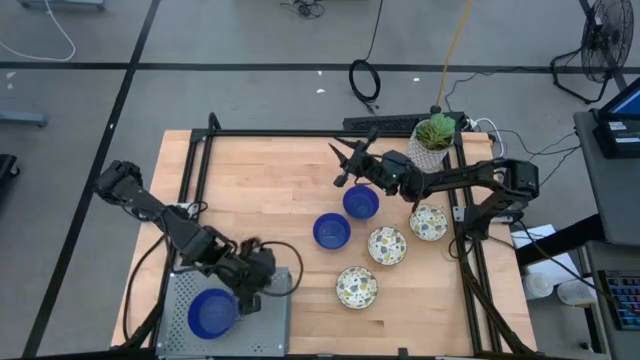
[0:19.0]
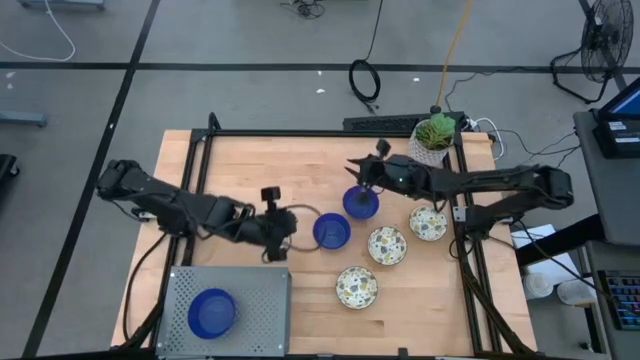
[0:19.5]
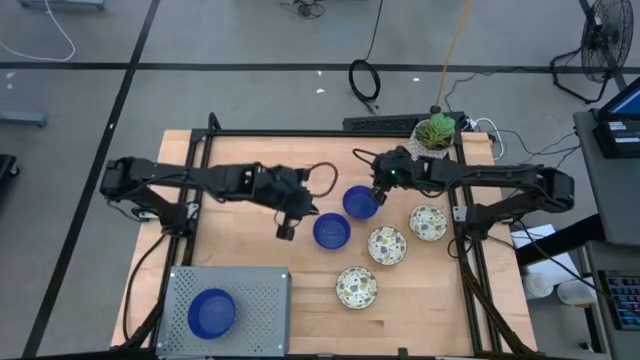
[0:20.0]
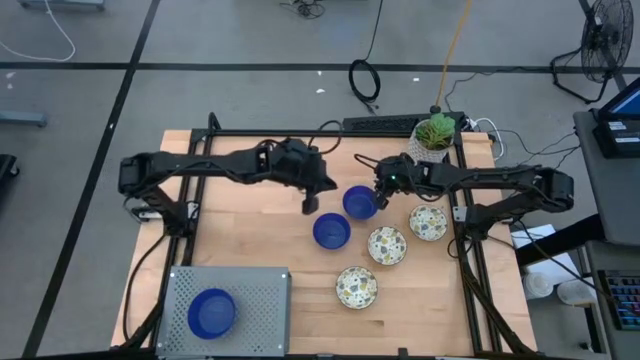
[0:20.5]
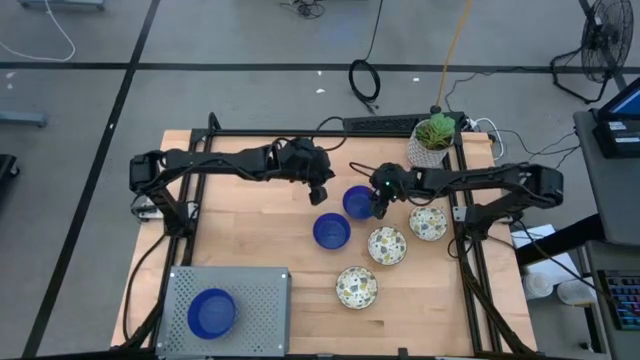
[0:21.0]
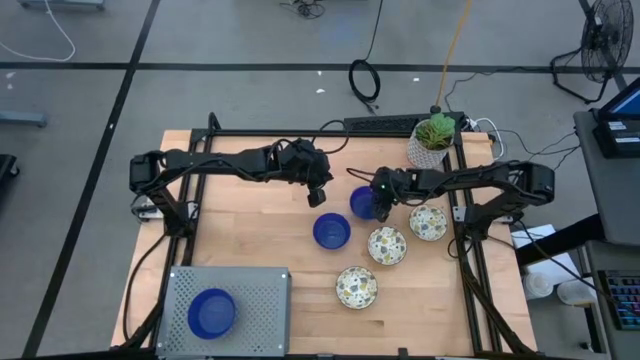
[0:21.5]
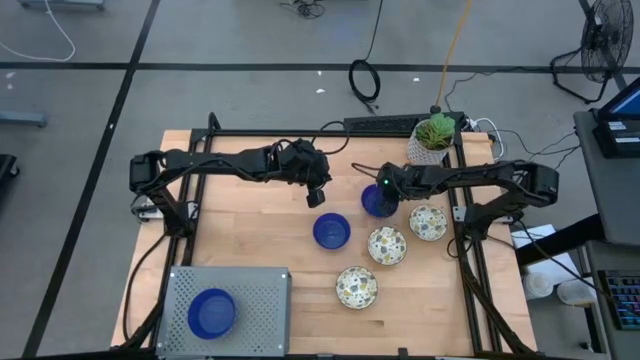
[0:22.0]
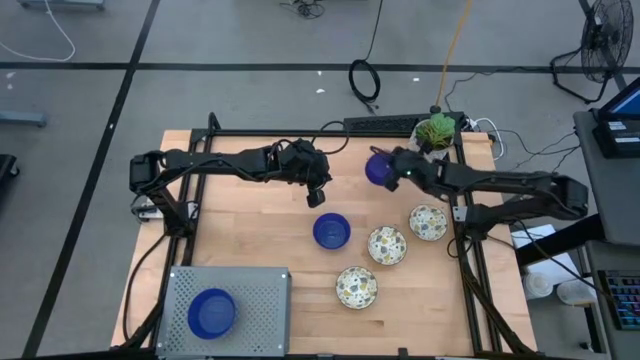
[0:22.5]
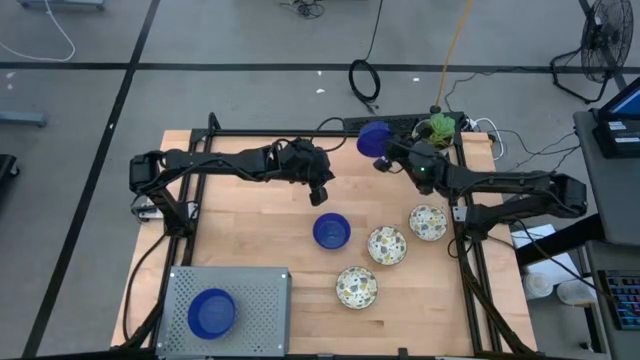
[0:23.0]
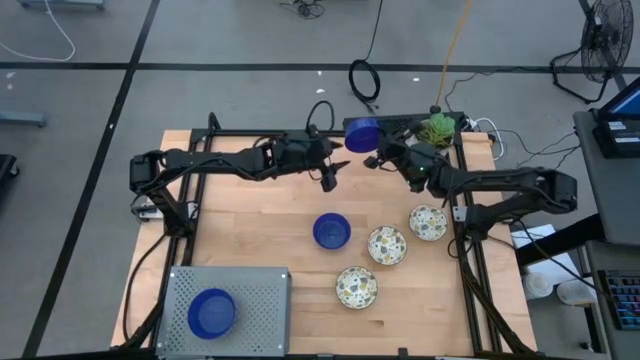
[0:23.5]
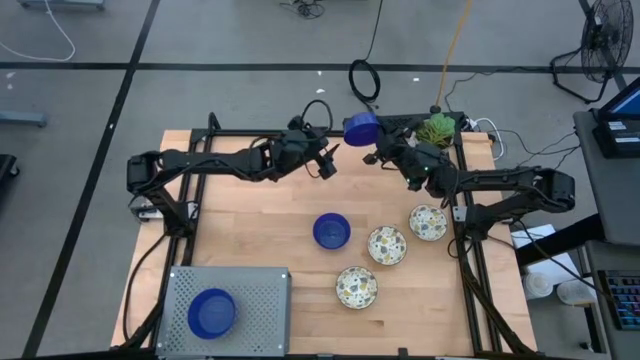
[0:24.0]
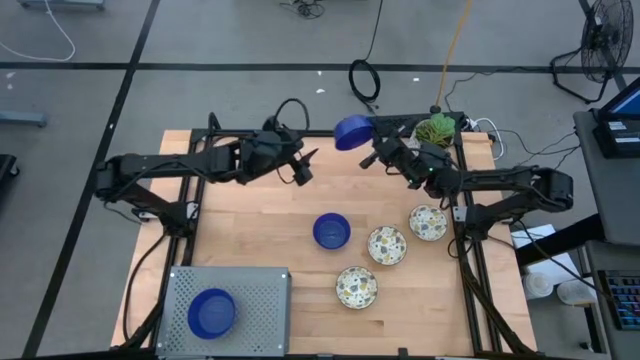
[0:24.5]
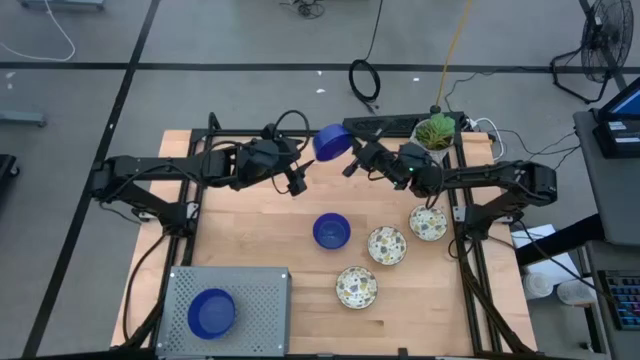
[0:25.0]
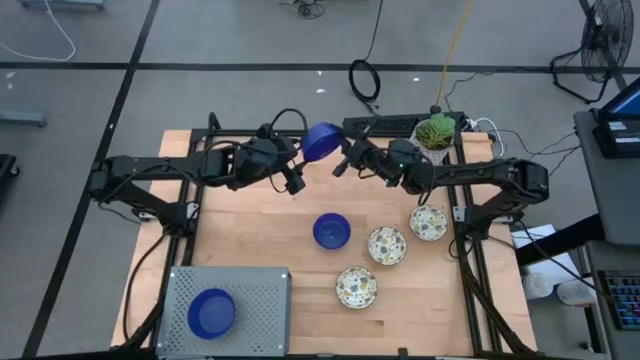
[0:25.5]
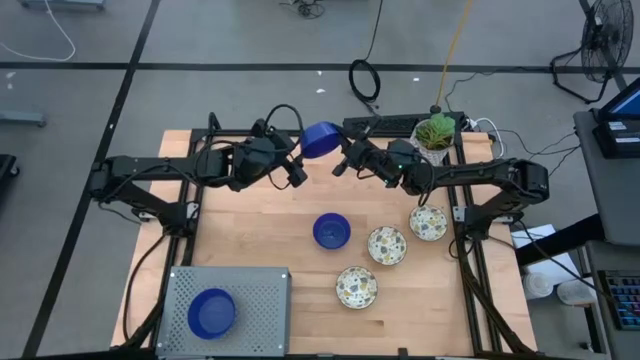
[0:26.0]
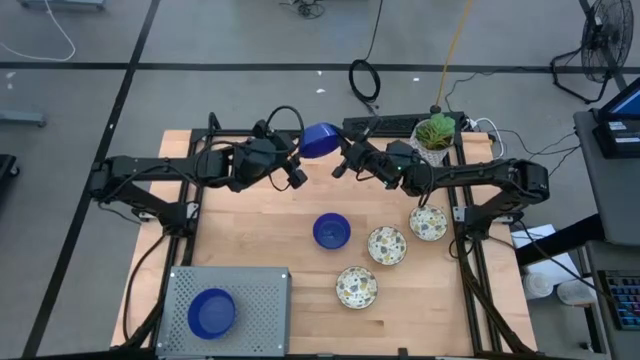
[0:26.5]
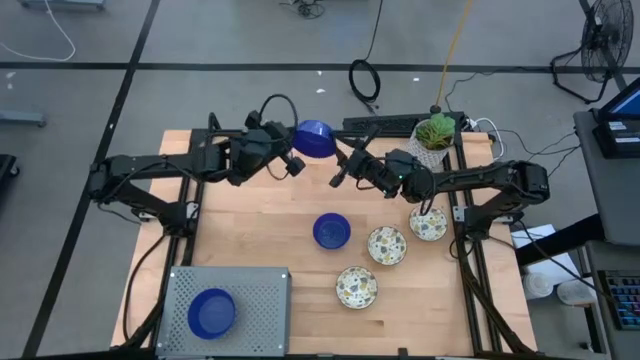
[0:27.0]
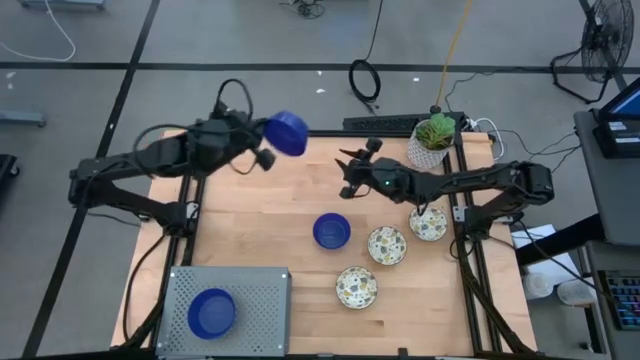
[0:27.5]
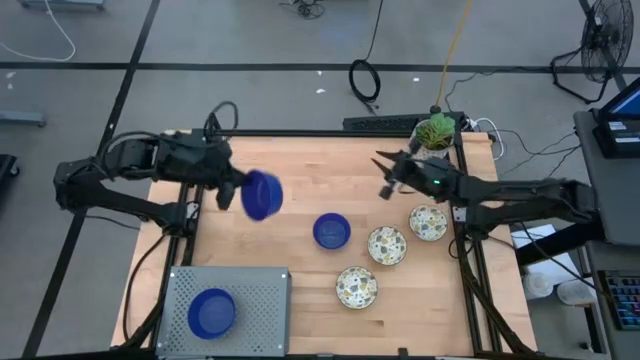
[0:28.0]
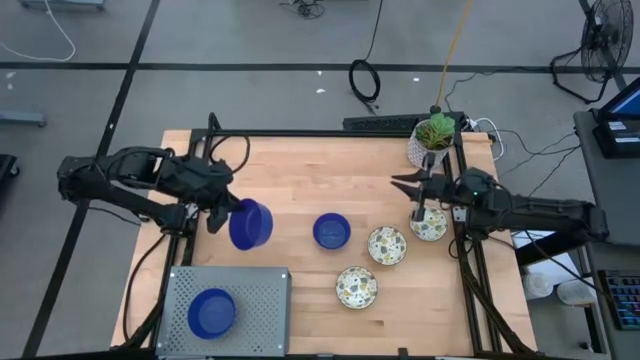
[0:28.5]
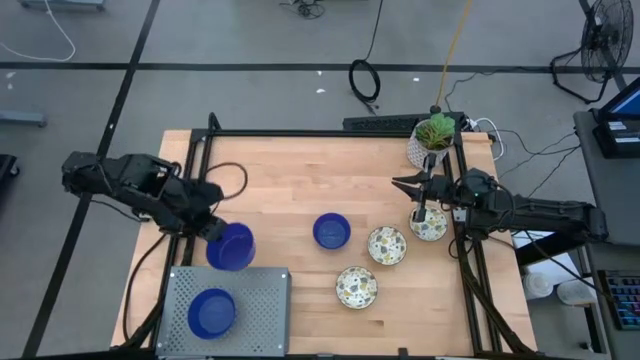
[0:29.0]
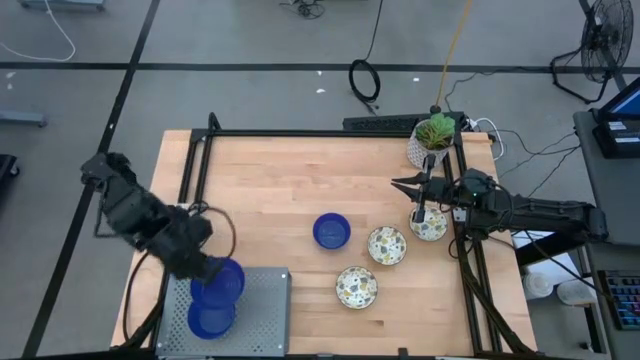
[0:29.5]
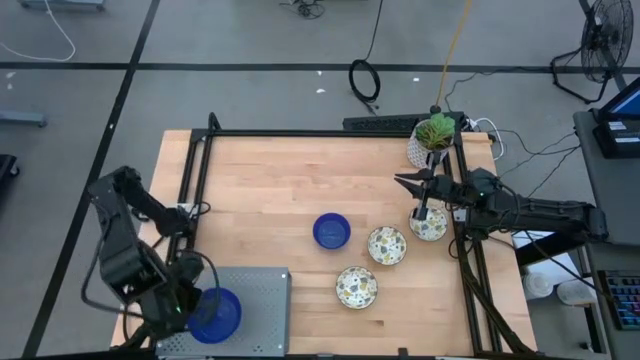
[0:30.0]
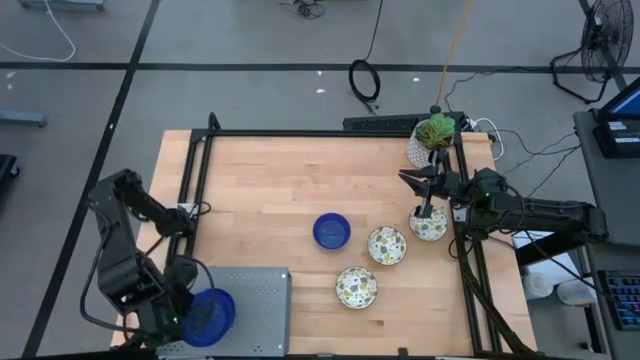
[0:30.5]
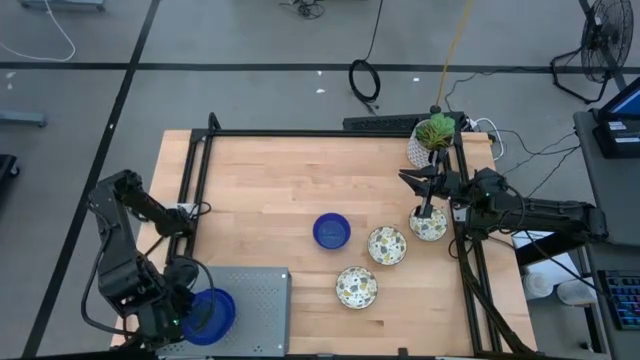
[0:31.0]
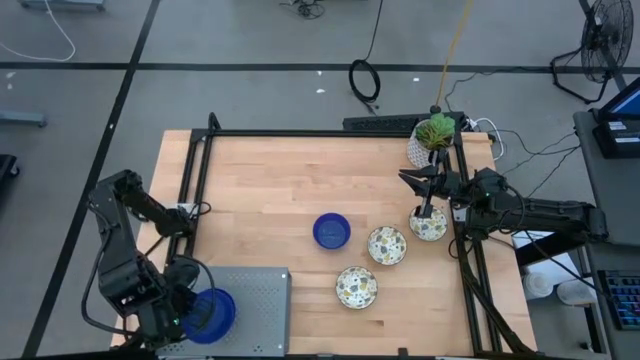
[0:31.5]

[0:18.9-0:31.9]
Task: Pick & Place Mini bowls
Stack the right blue bowl on top of the other blue bowl on the shelf

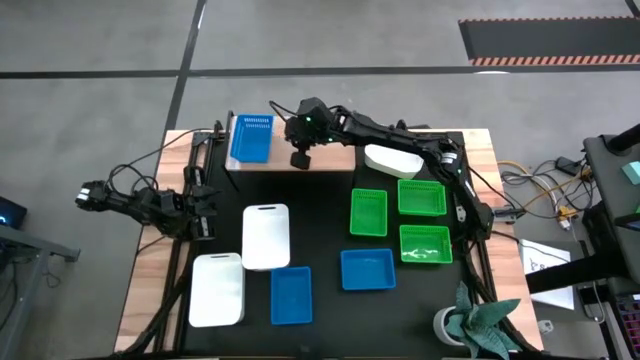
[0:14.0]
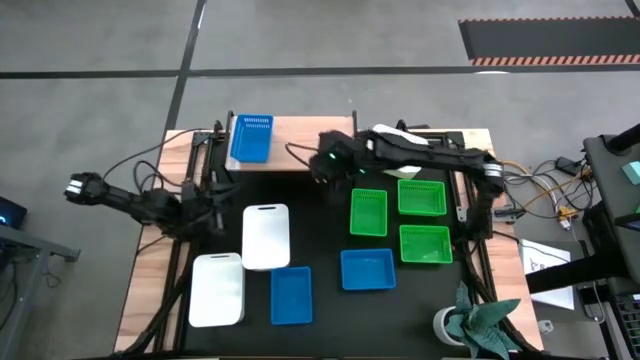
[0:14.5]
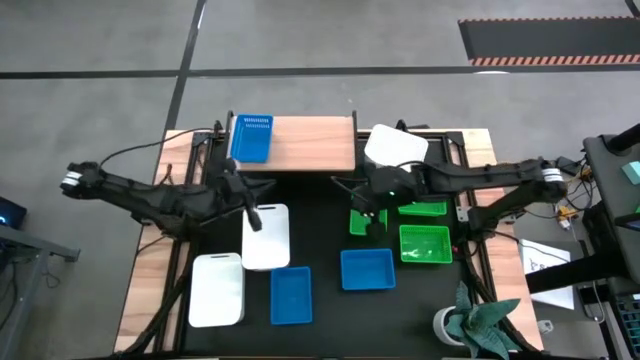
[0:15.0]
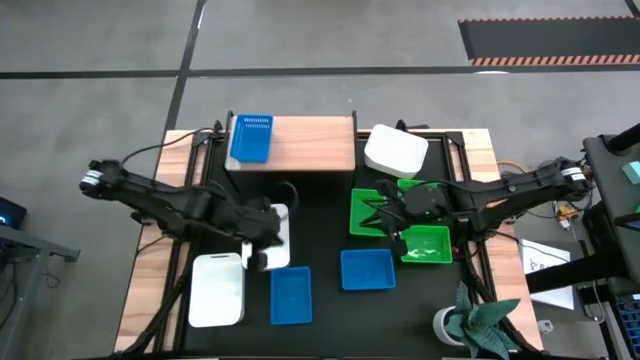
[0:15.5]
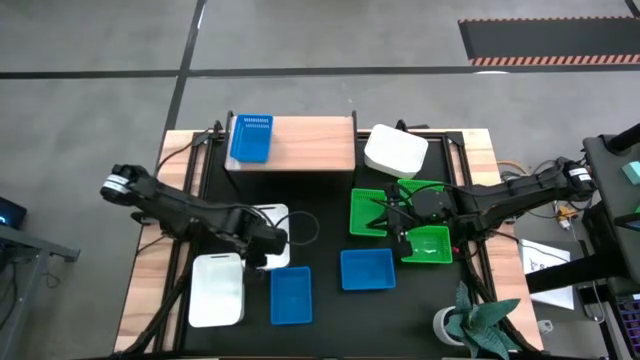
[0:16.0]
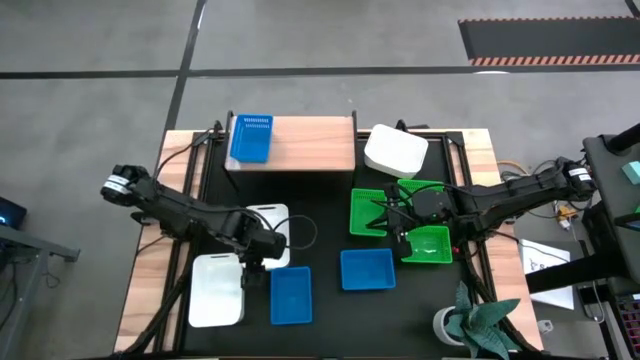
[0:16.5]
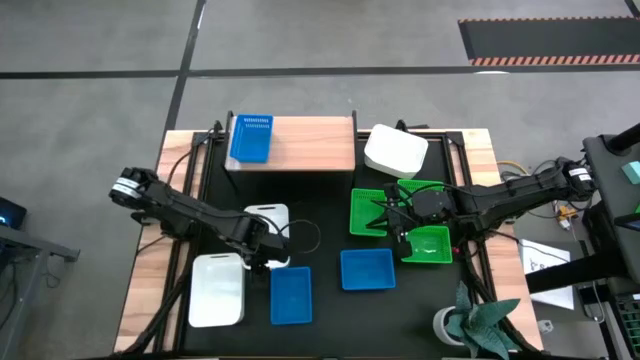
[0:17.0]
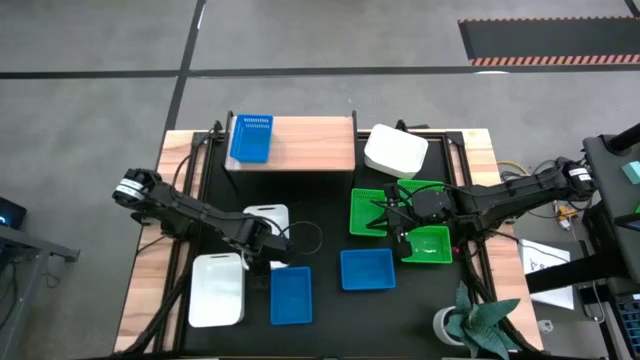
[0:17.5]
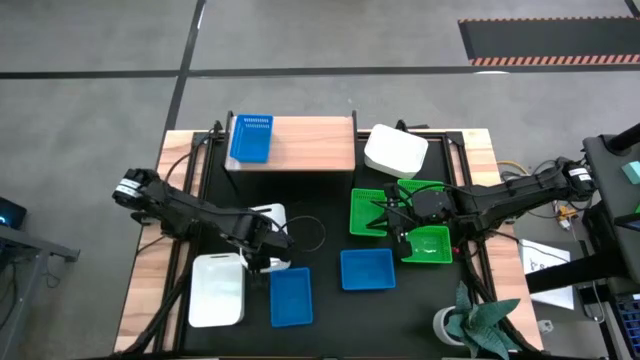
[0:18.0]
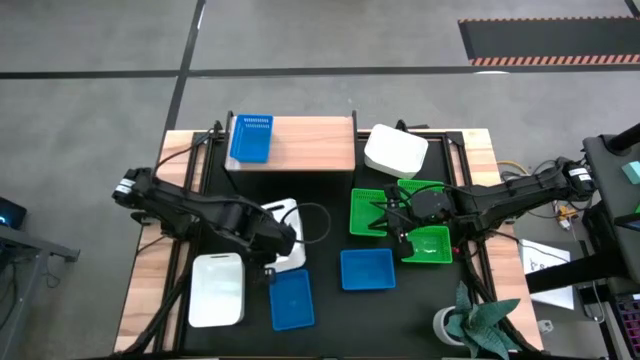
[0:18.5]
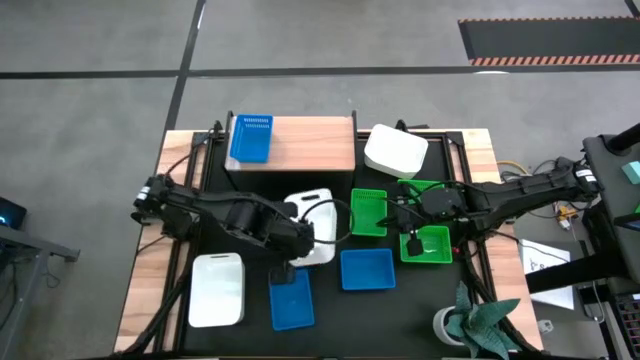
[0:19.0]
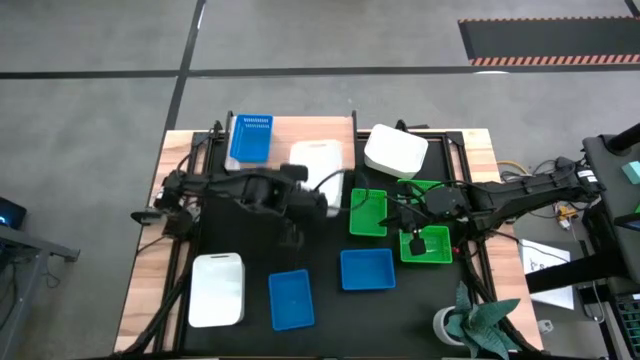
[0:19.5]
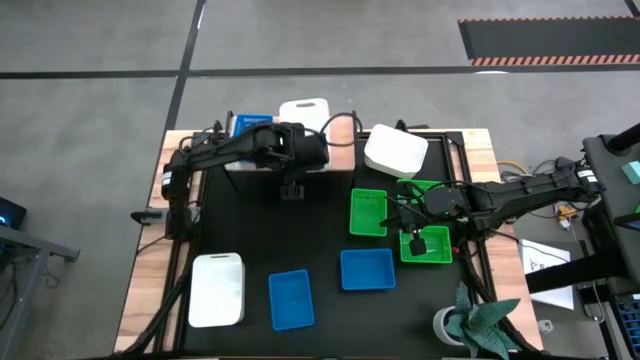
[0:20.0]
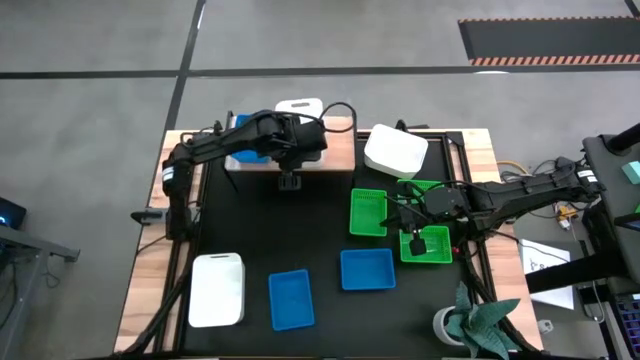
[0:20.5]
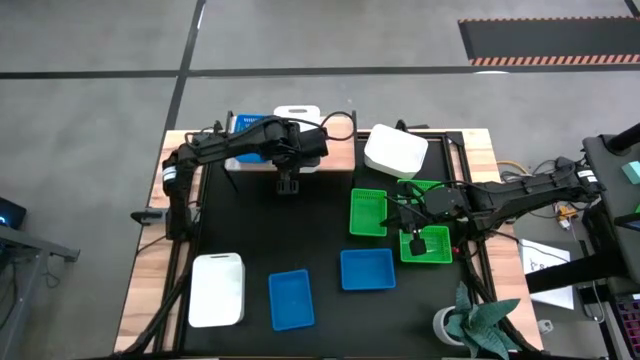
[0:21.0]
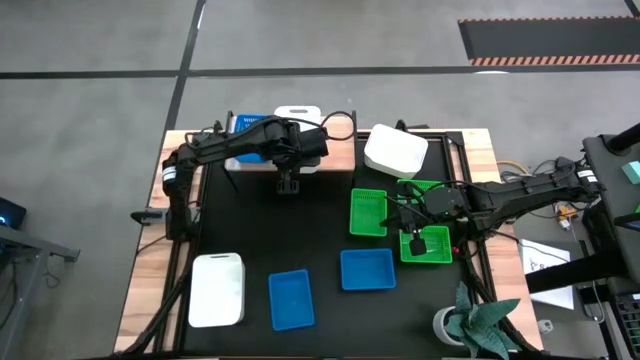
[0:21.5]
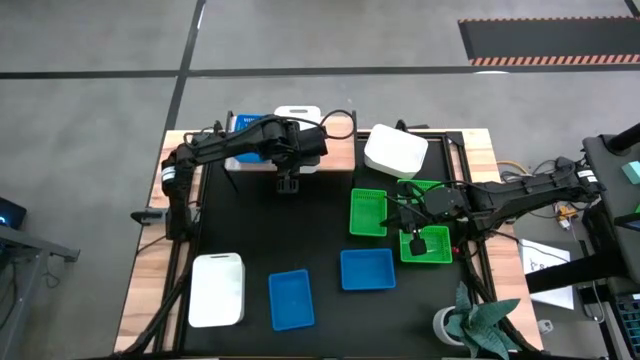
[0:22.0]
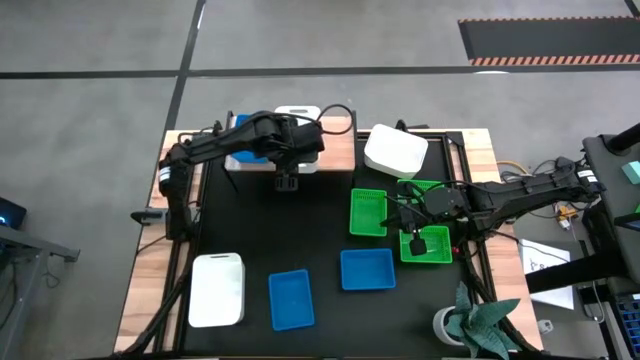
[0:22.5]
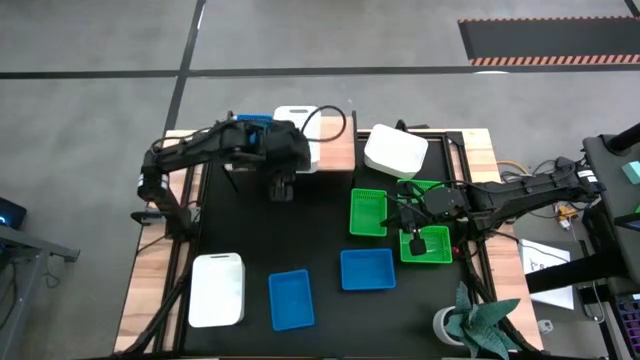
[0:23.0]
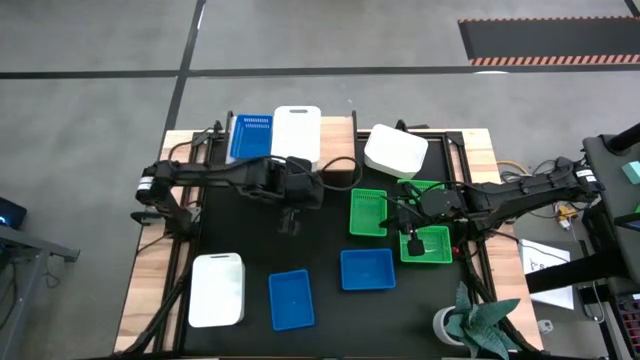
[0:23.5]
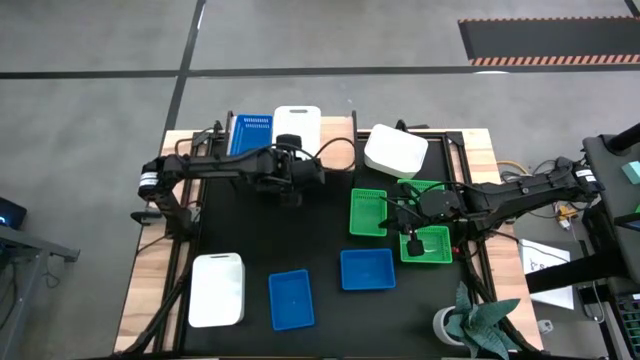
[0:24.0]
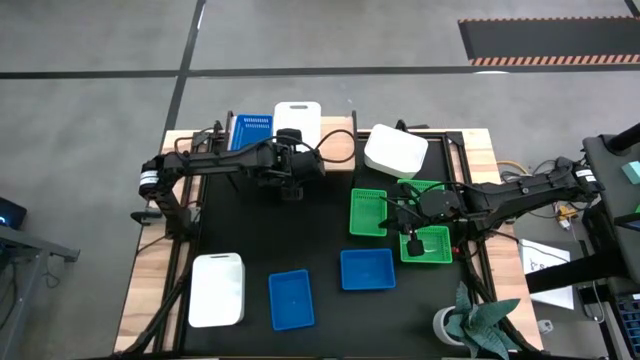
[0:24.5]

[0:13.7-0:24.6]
Task: Stack baskets on shelf by color
Put the bottom right white bin on the shelf
